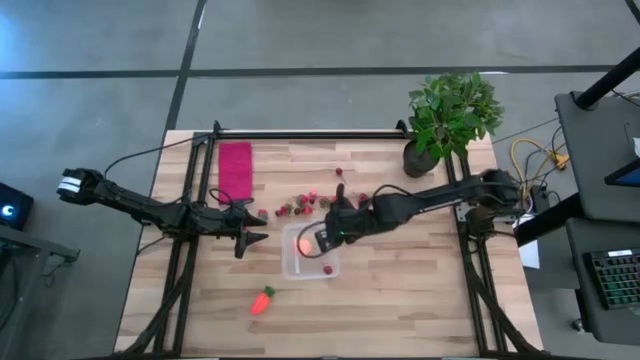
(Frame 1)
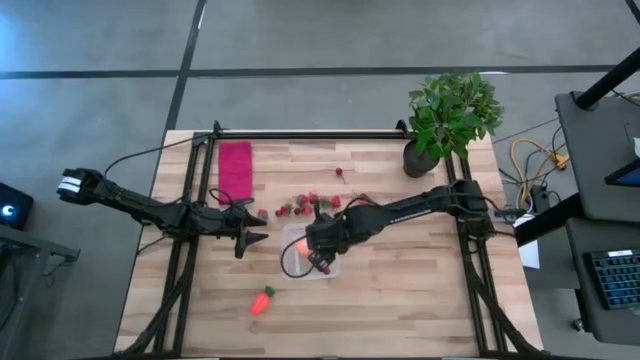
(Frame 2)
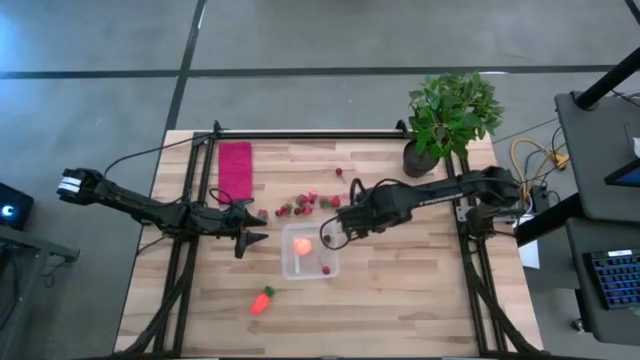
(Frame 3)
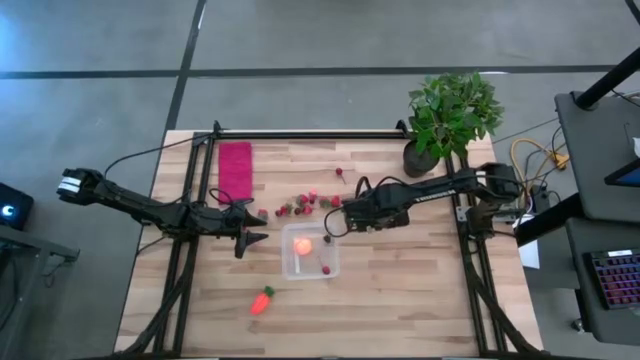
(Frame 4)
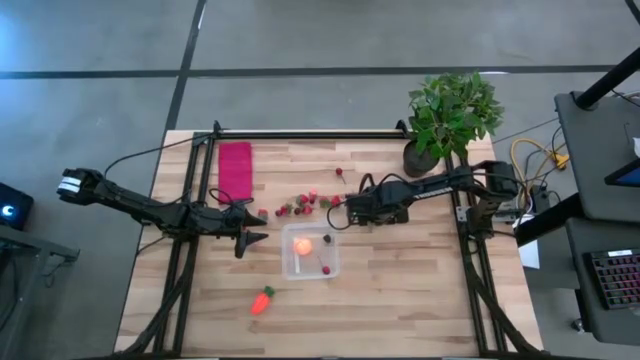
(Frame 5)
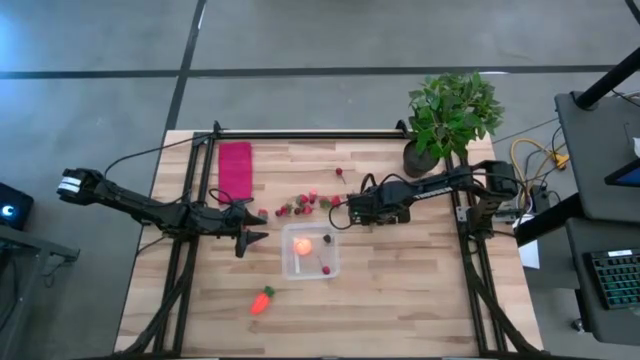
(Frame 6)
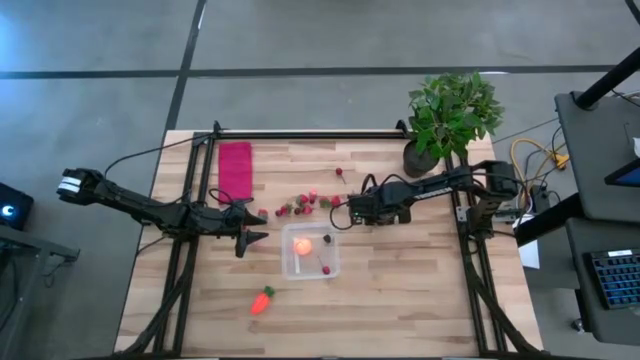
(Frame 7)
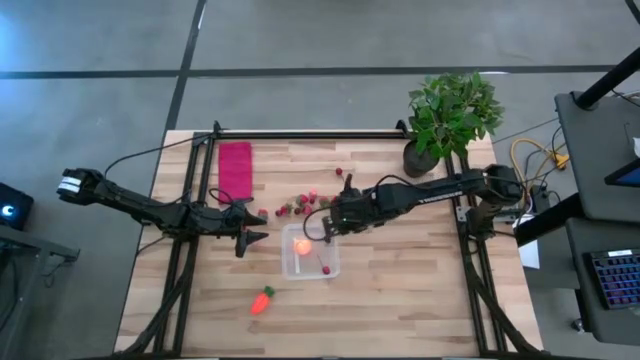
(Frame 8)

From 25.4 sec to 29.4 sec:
Task: Pick and placing Produce into tupperware
Put the red cherry into the transparent bin

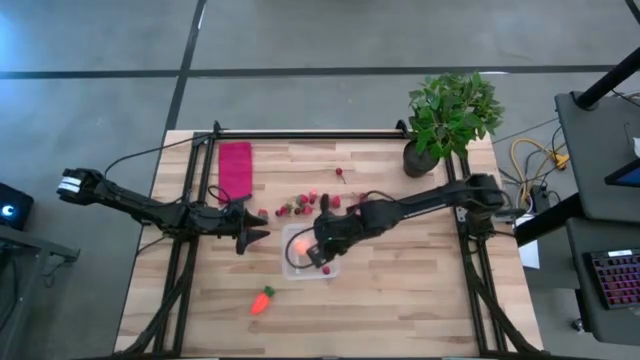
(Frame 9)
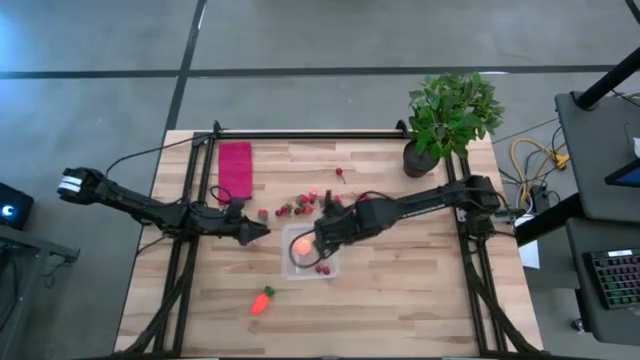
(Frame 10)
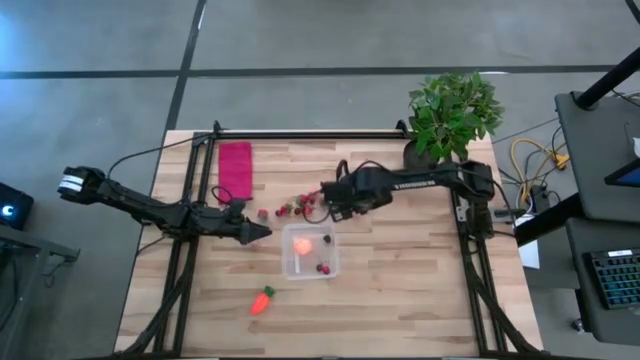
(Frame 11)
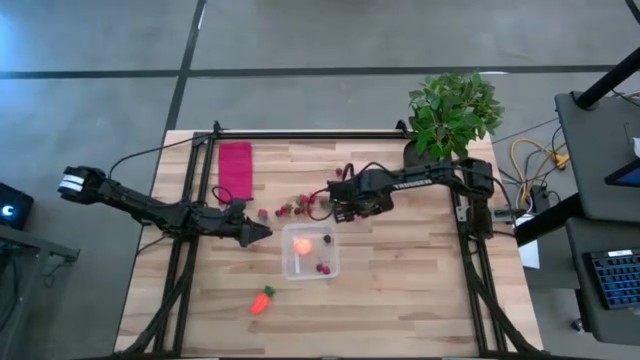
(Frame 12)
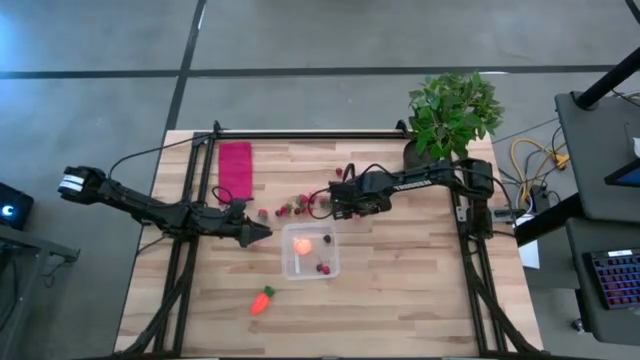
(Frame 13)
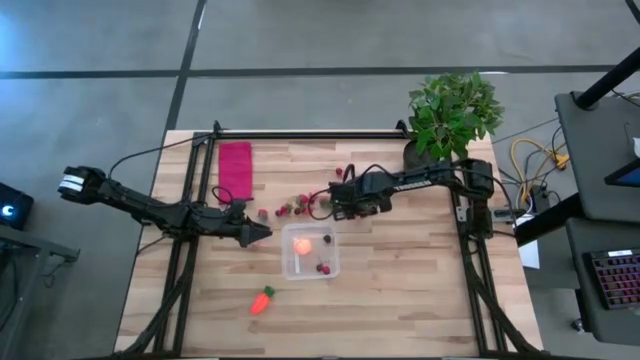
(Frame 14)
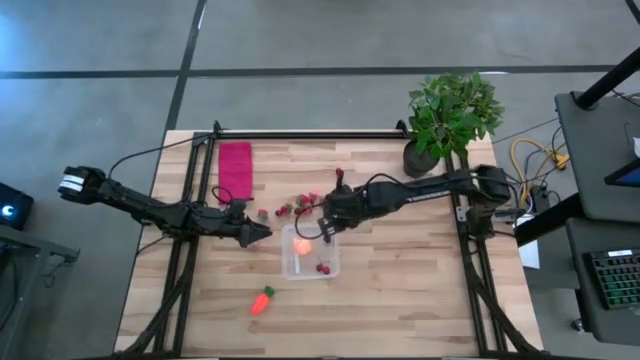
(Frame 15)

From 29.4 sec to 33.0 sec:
Put the pink peach into the transparent bin

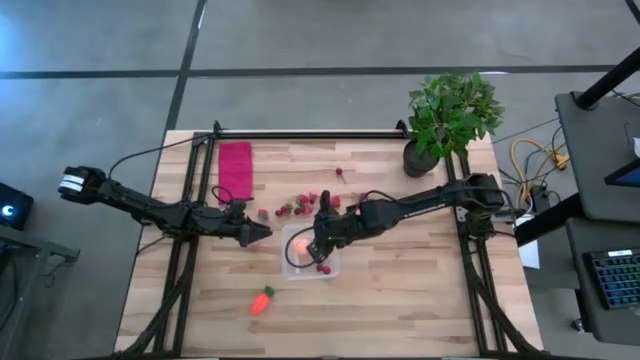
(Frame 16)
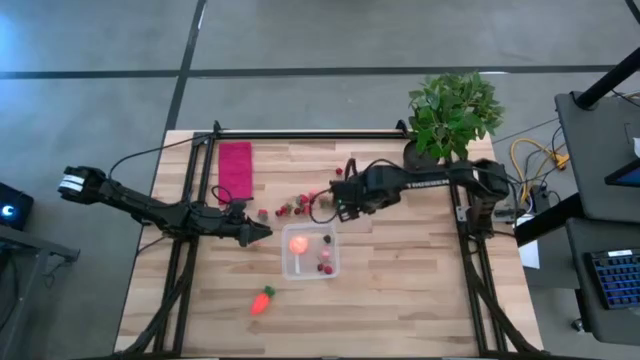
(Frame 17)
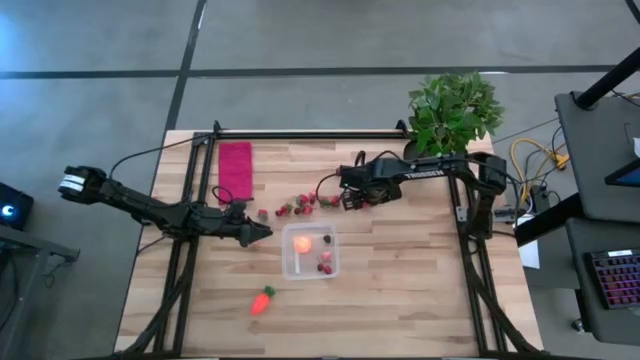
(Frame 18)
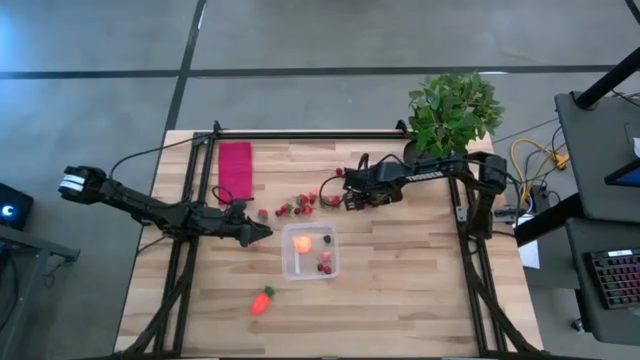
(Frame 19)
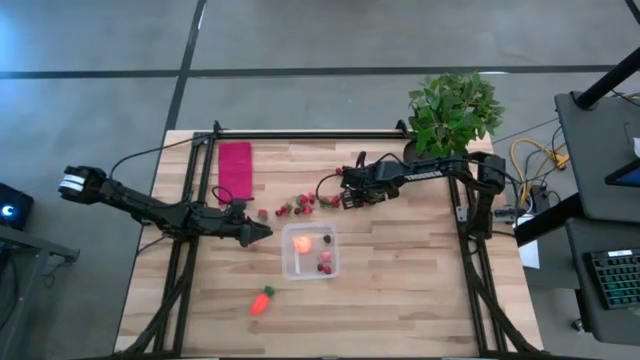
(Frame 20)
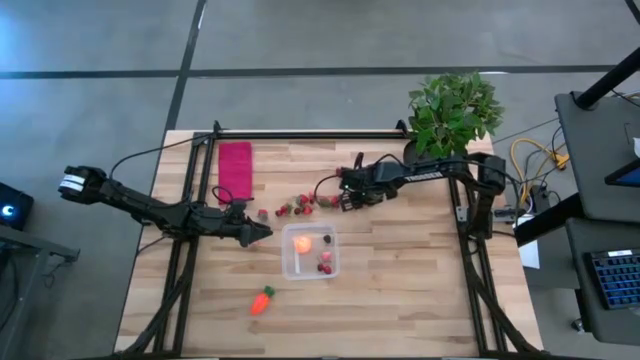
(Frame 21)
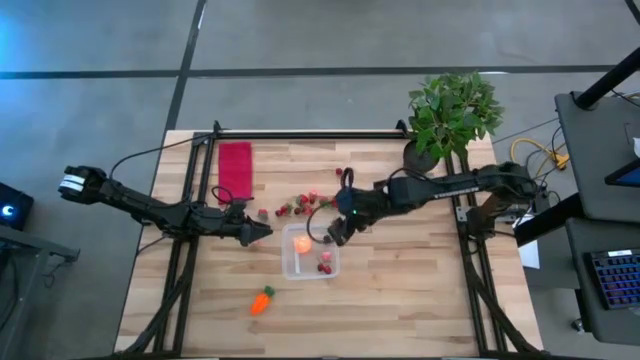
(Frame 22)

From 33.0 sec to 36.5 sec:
Put the red strawberry into the transparent bin

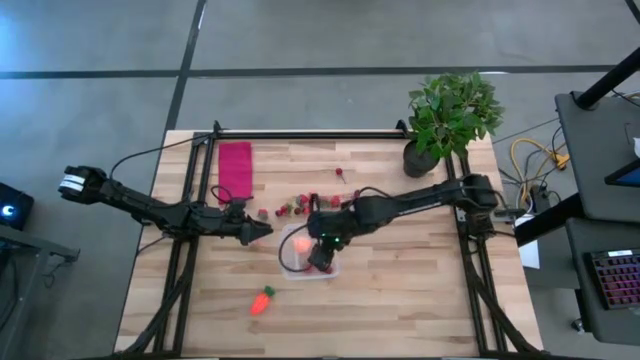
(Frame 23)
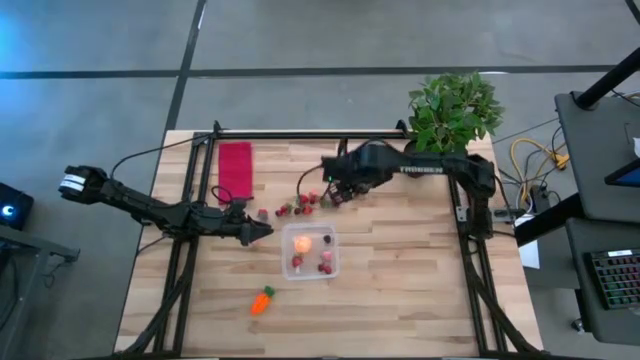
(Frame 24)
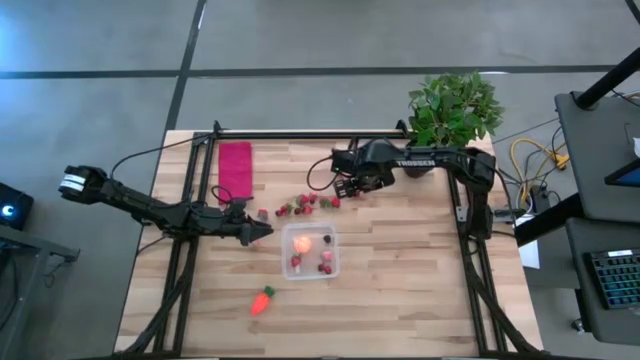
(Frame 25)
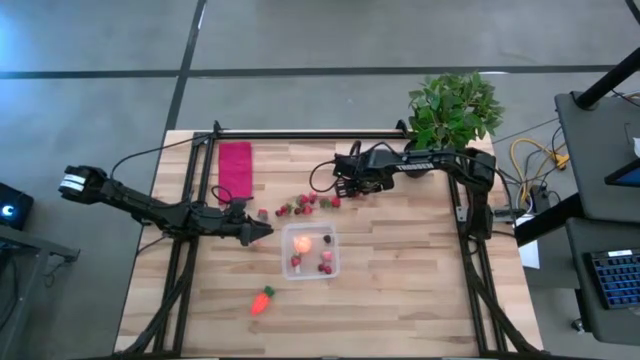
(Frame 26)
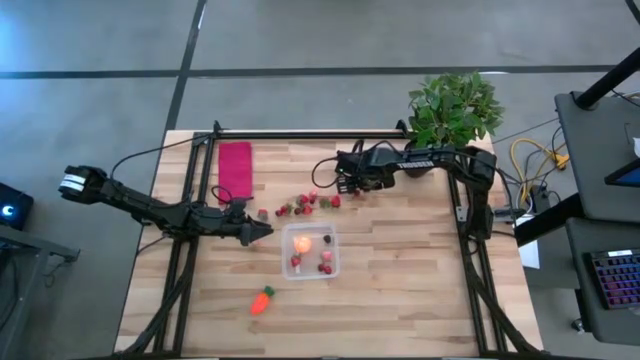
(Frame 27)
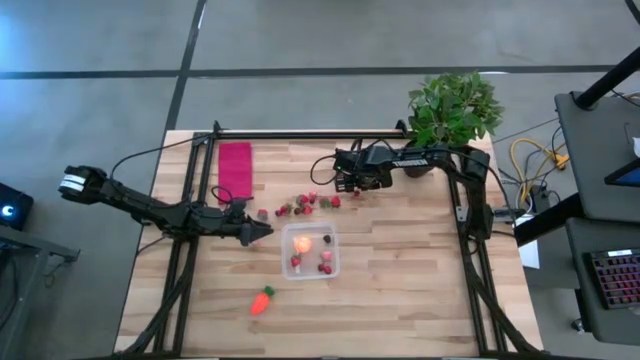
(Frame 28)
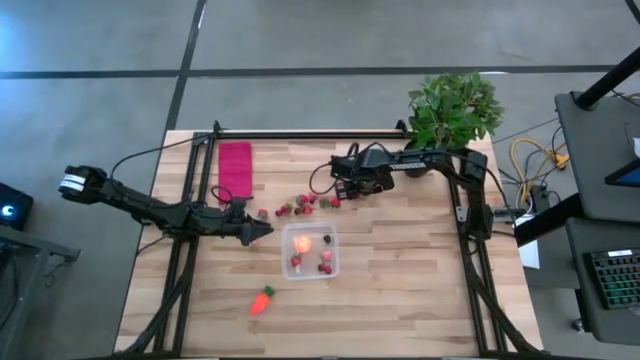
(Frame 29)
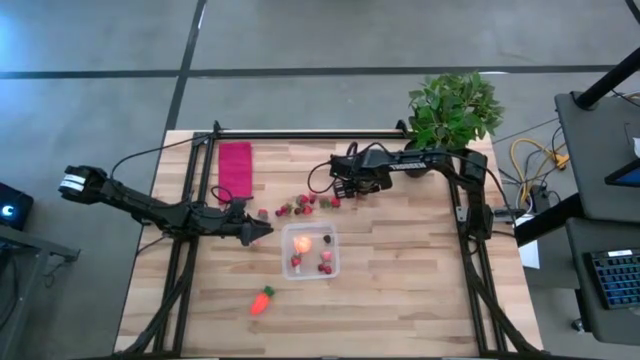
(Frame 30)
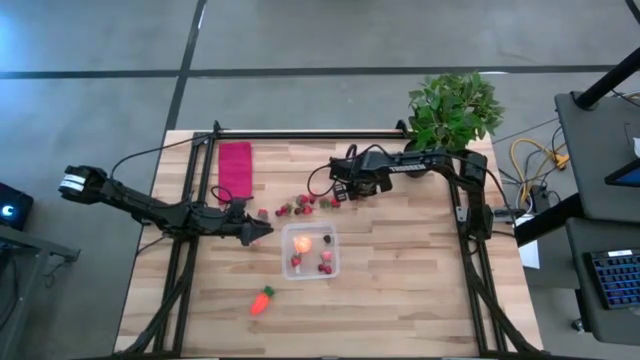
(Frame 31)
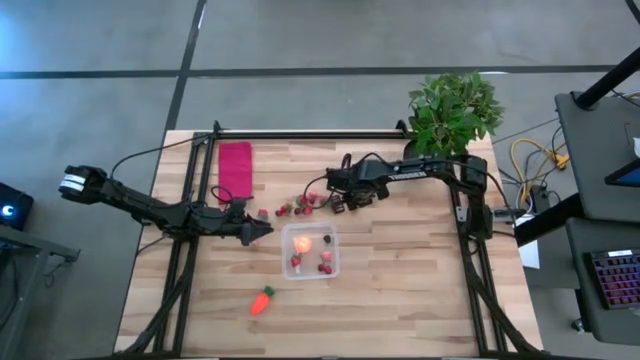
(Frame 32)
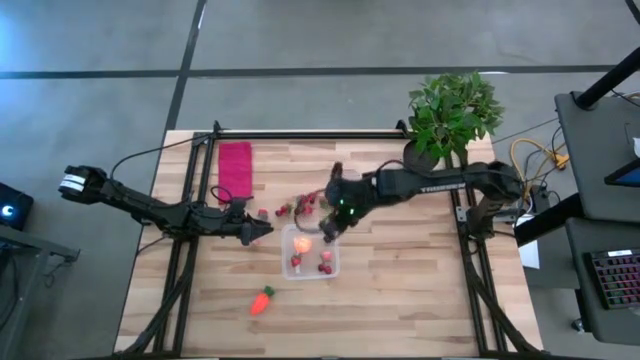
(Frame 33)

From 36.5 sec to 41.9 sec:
Put the red cherry into the transparent bin

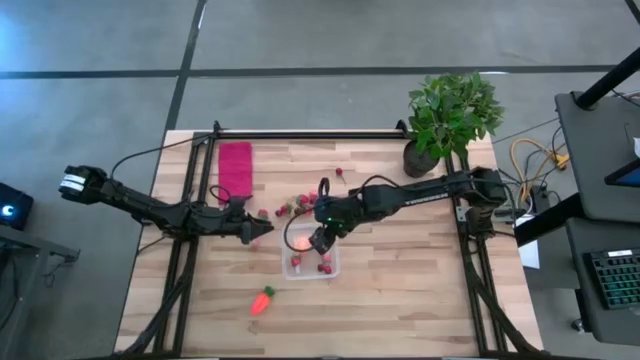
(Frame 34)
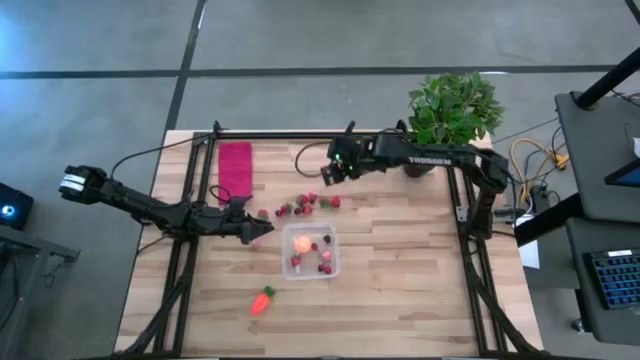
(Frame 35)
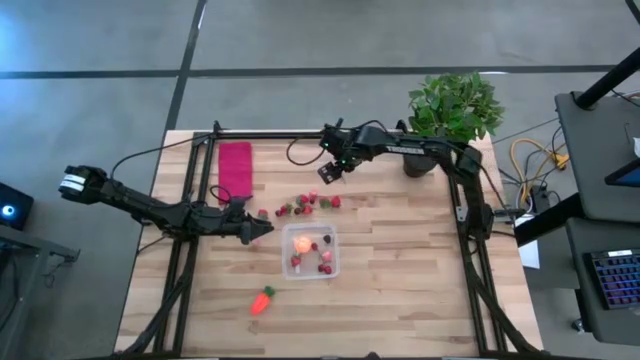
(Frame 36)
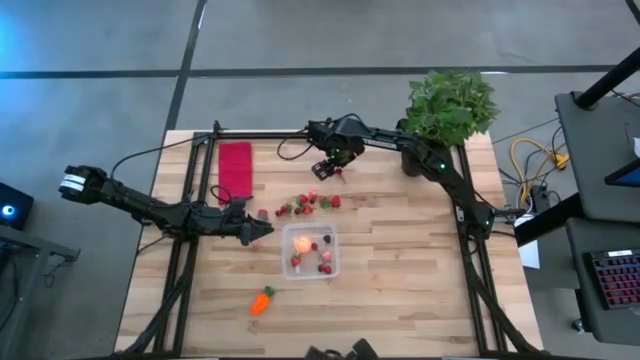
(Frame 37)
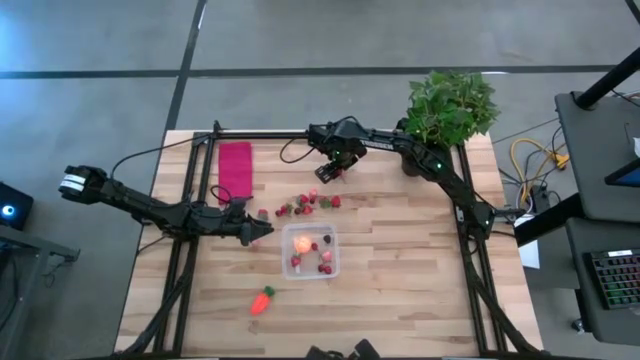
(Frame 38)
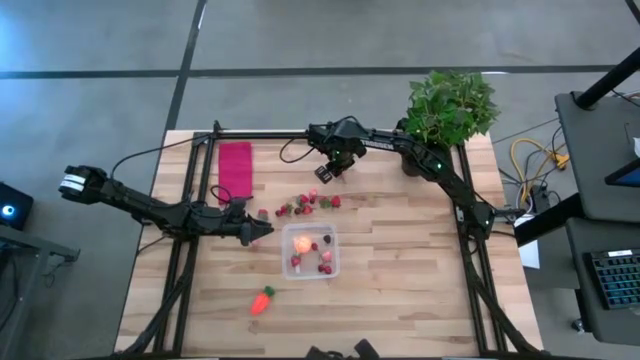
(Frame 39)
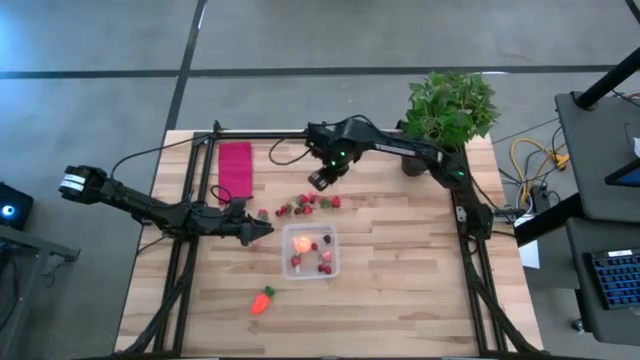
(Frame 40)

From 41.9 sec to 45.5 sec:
Put the red cherry into the transparent bin

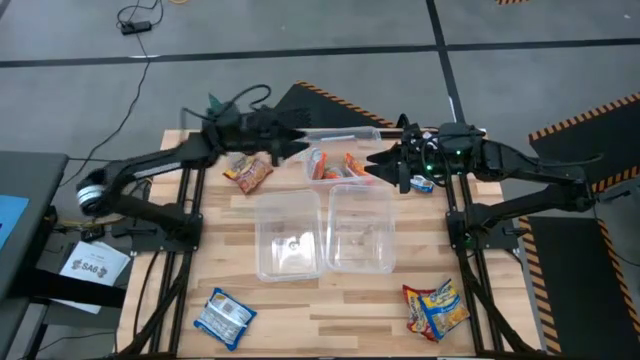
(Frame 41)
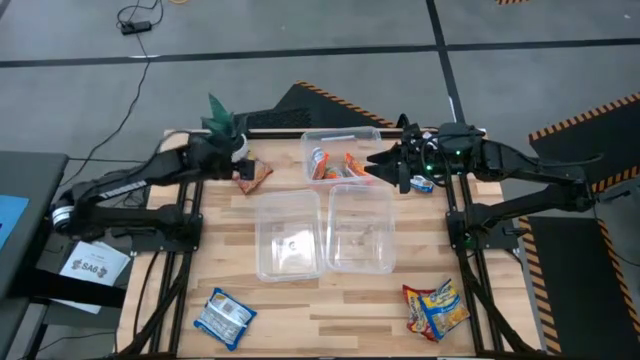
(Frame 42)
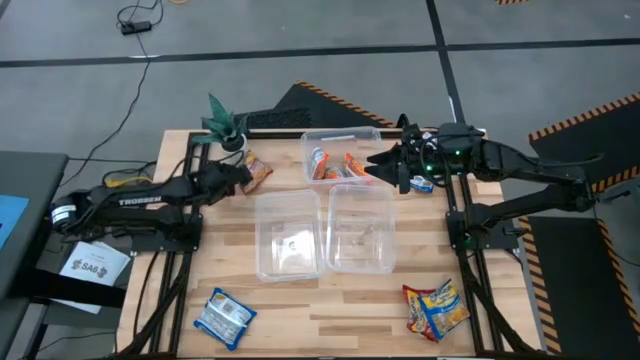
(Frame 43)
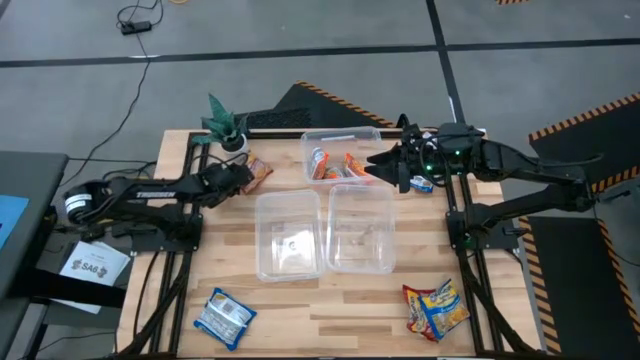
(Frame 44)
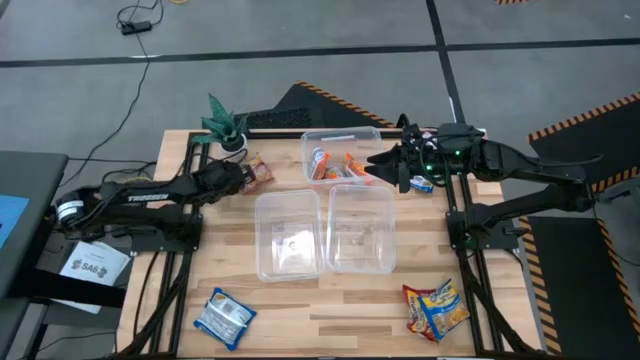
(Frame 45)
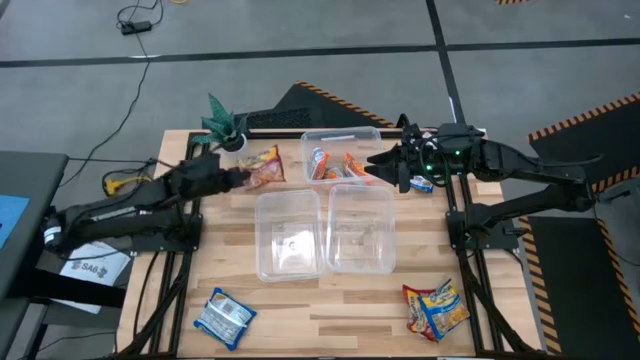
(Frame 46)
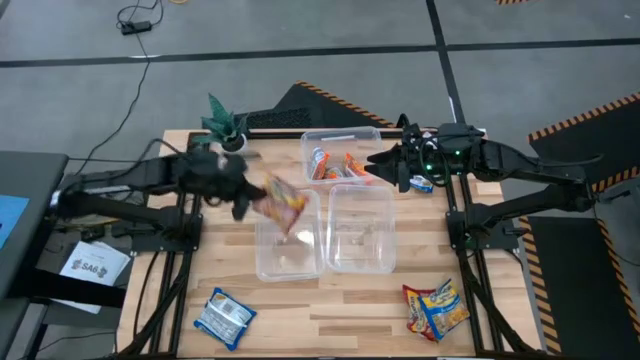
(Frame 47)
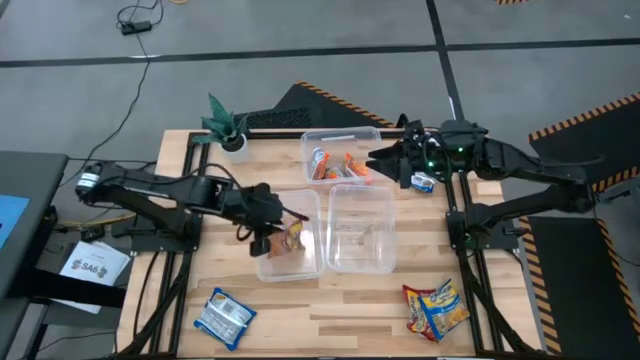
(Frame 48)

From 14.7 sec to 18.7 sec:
Task: Sort Maruchan noodles
Put the top left red noodle pack into the bottom left transparent bin
